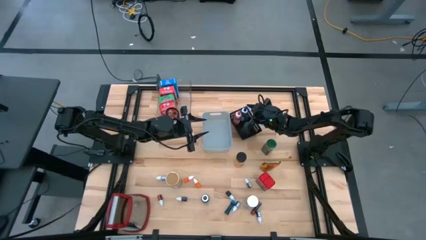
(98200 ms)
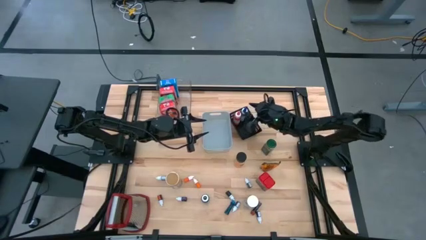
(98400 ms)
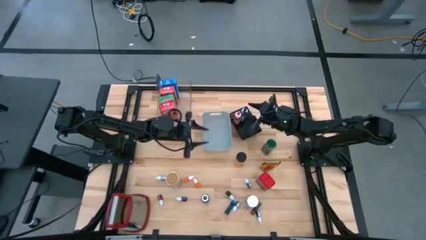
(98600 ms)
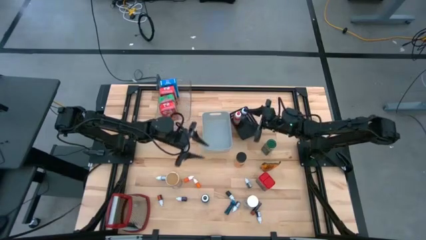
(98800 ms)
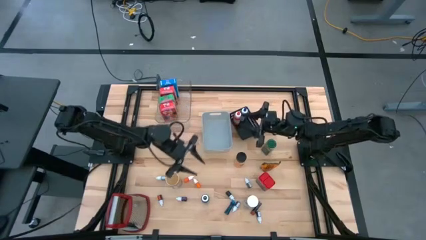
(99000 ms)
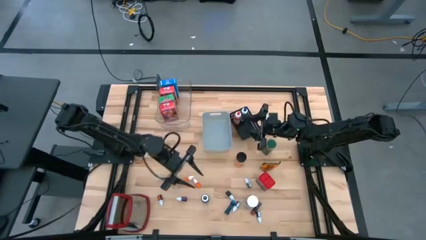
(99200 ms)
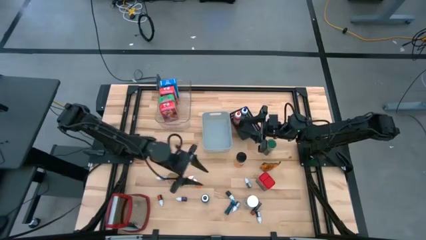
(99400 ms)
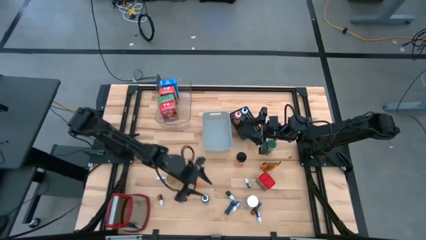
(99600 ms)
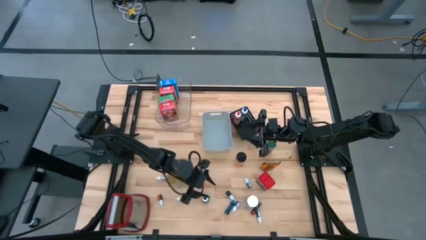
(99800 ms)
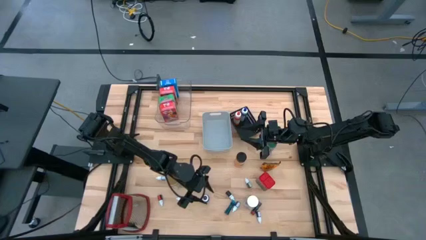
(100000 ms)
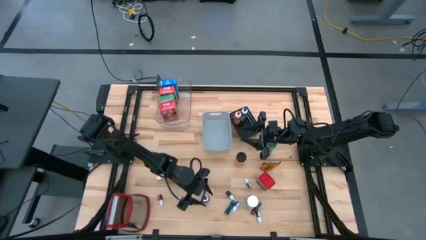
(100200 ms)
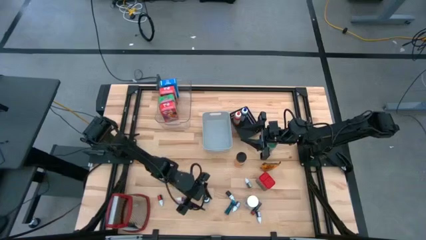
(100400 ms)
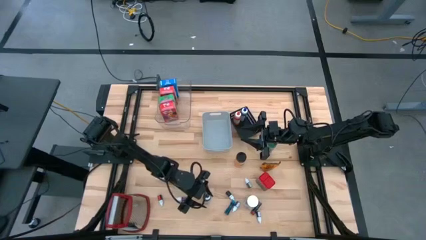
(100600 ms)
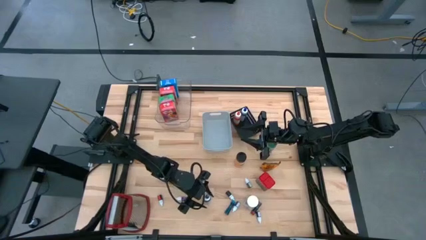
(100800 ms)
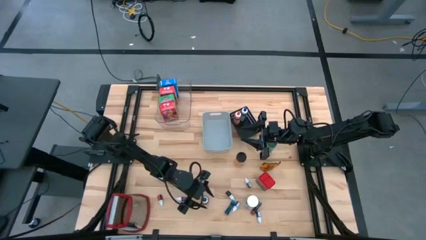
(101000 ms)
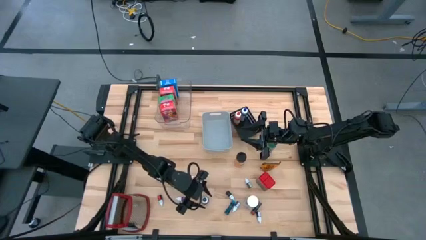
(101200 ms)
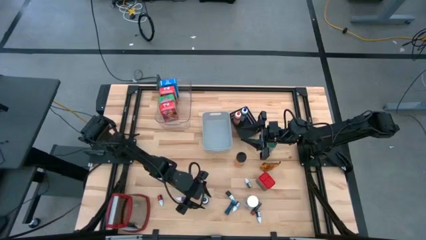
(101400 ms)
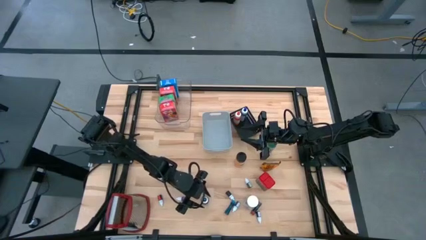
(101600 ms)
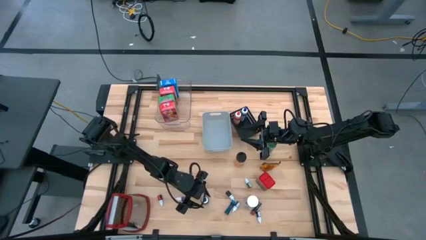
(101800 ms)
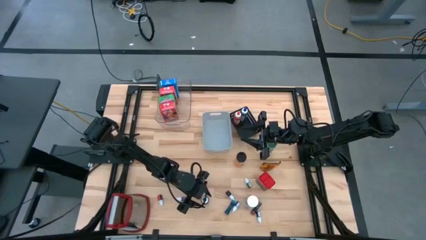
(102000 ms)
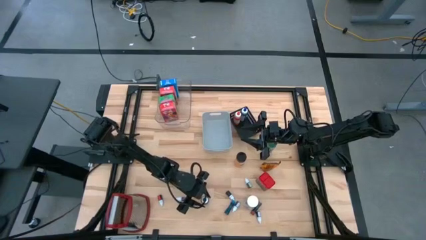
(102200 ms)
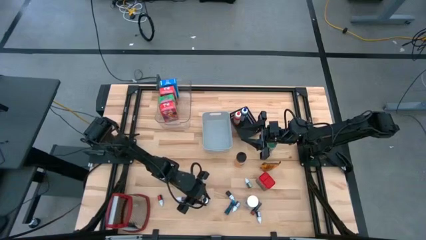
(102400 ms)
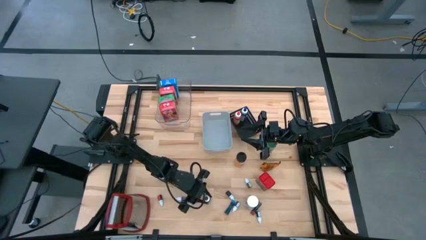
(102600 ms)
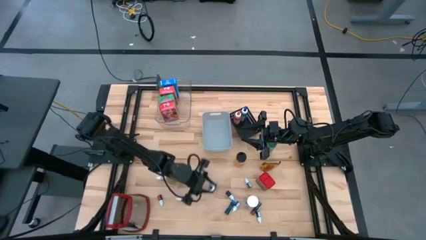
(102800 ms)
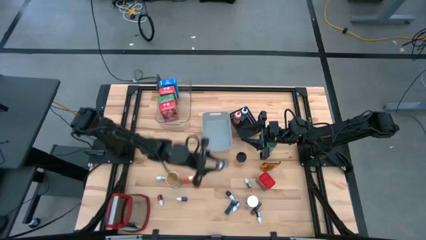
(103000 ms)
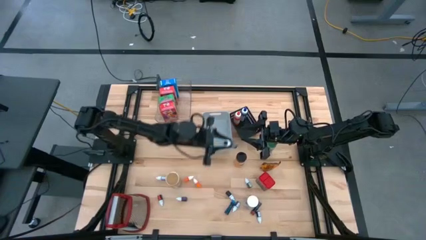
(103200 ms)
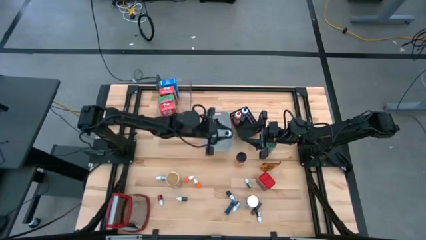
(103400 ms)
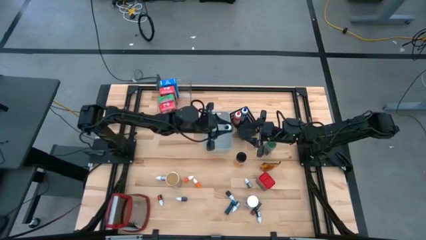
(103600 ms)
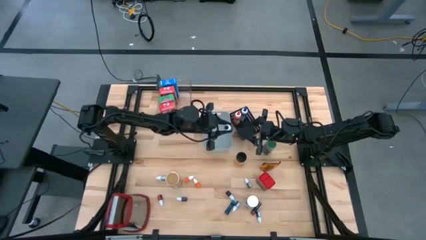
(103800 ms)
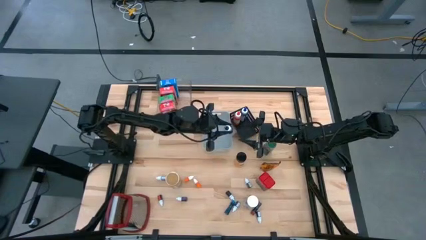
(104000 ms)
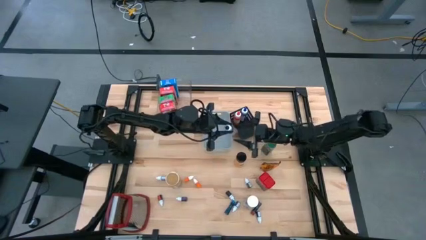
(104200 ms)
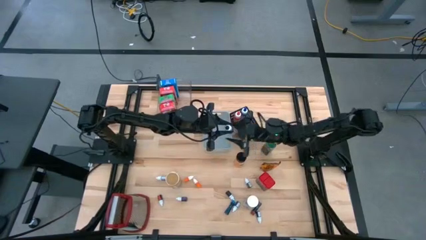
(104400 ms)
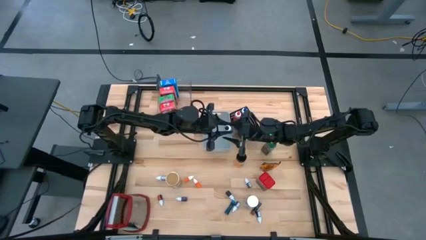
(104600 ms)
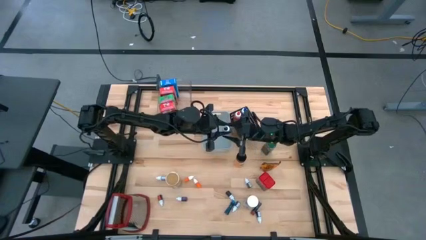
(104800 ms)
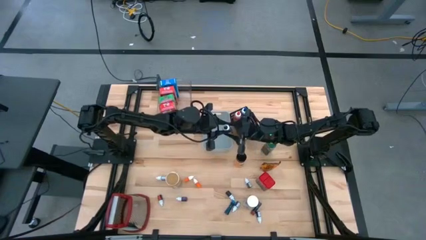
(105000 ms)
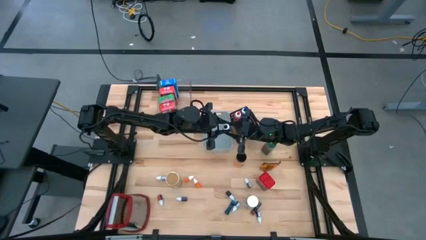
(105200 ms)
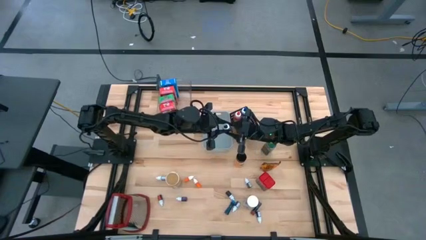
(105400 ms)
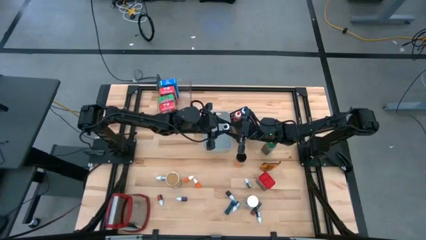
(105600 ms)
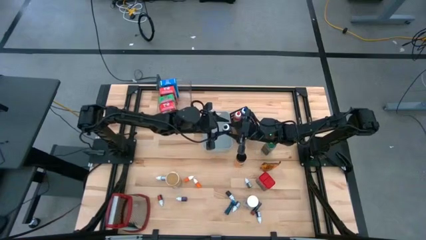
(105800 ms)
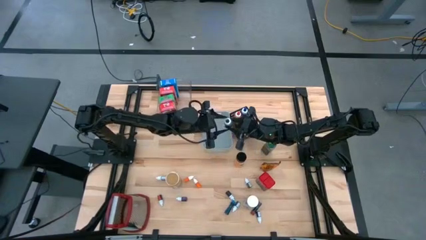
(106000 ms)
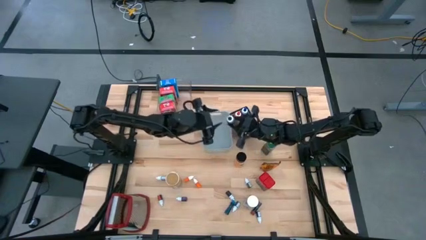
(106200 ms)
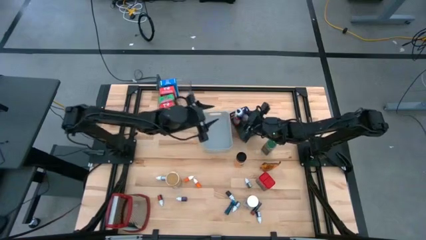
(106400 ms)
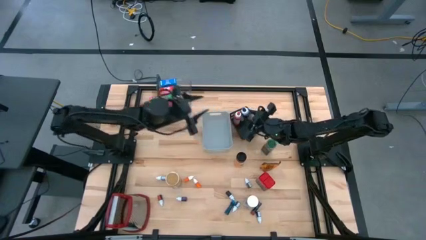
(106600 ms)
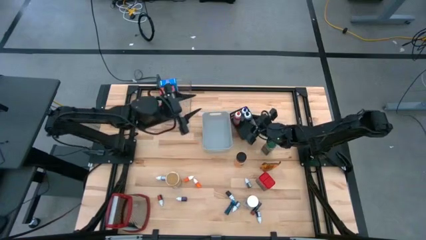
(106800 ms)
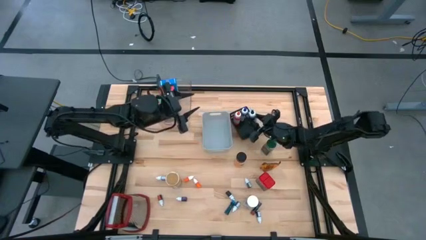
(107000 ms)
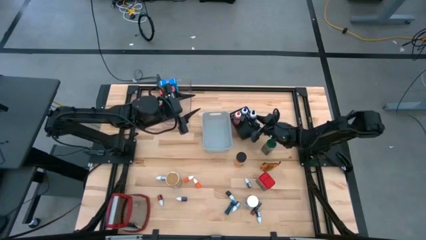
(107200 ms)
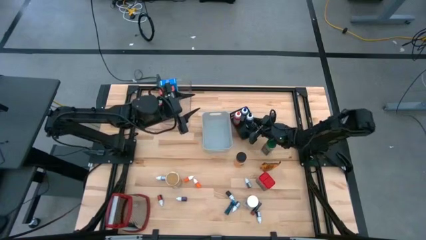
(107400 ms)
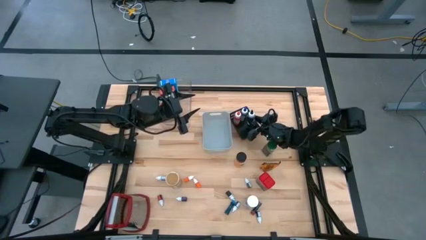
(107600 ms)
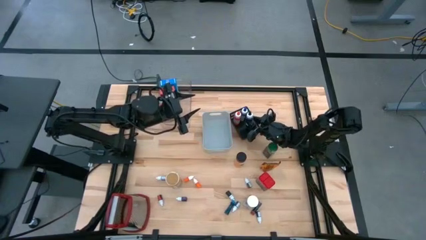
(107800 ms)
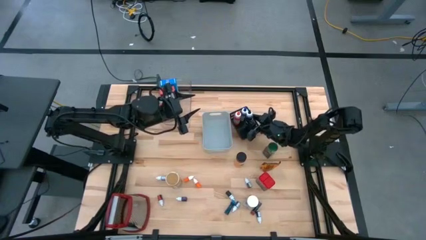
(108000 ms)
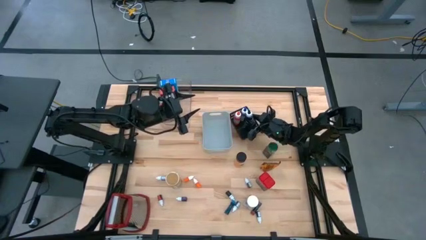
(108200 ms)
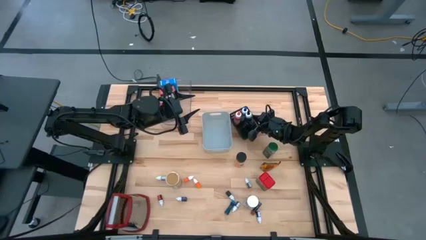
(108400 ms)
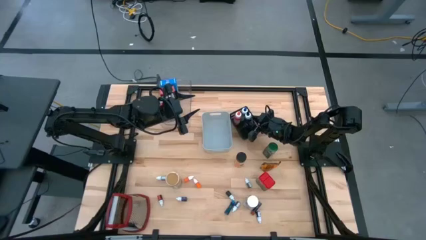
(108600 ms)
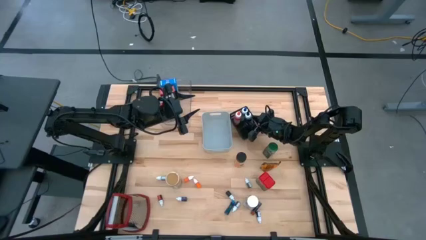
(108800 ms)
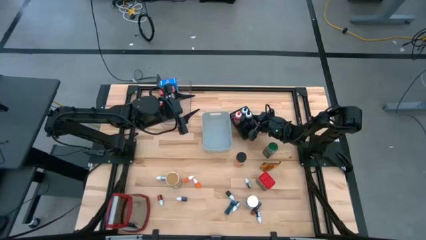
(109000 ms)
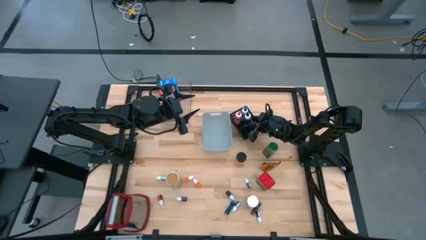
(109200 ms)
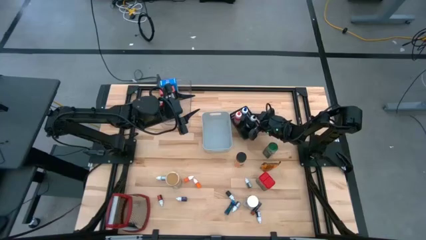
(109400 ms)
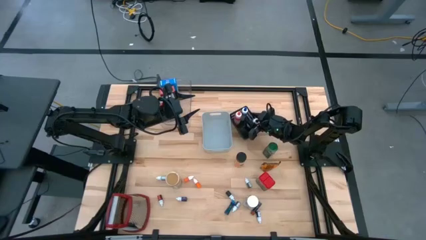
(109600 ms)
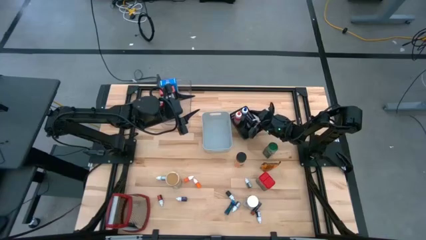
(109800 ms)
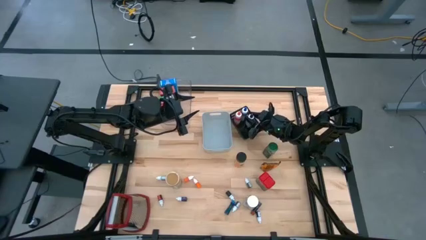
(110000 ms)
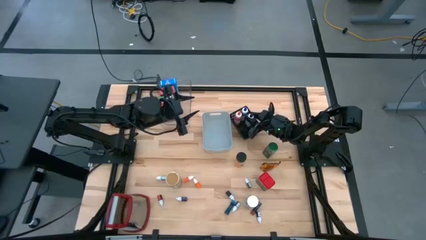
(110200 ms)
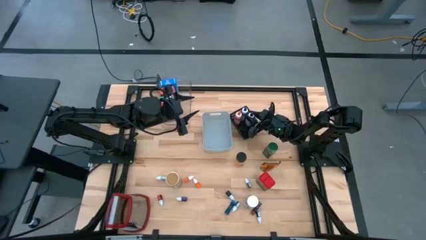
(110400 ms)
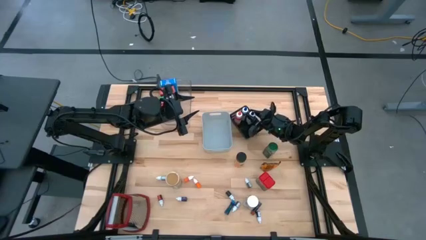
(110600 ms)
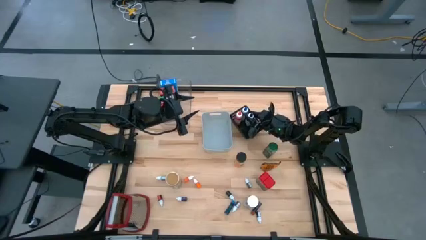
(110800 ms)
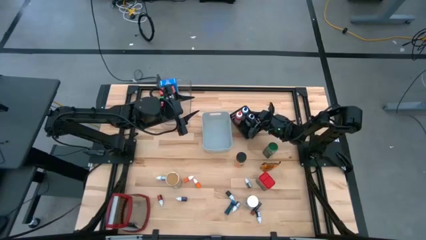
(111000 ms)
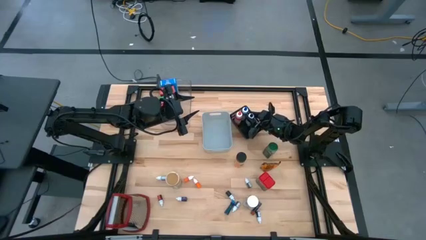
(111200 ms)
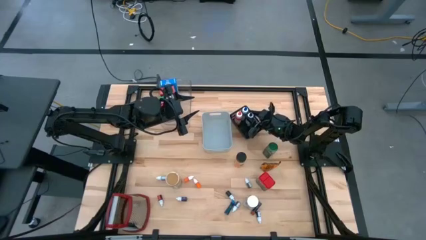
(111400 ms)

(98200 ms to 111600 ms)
Task: Pick & Place Kitchen Items
Put the black food color bottle into the black bin

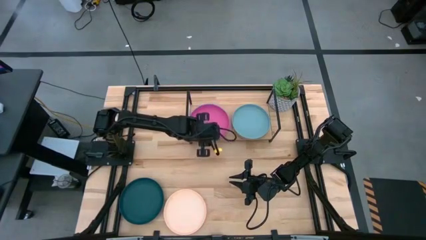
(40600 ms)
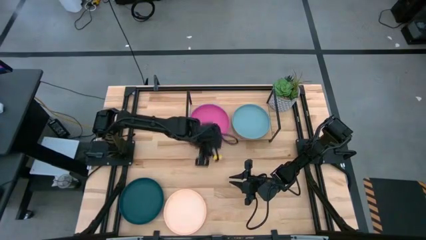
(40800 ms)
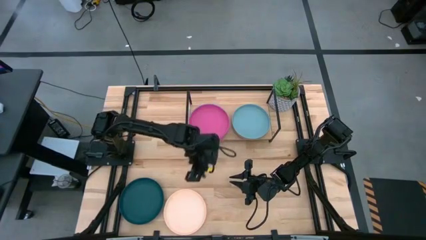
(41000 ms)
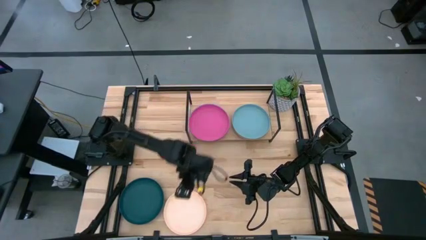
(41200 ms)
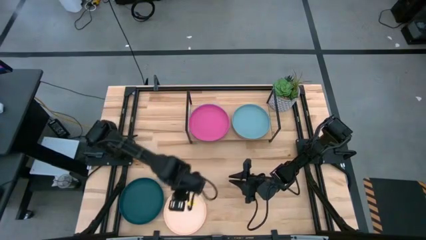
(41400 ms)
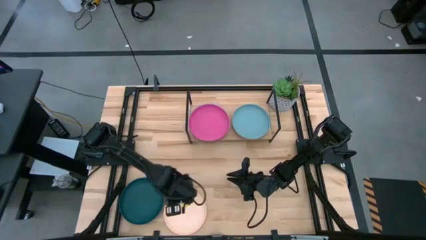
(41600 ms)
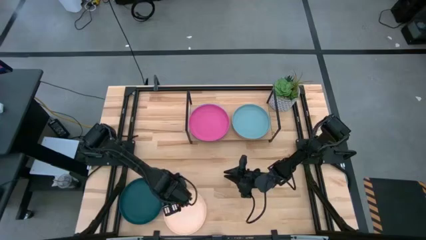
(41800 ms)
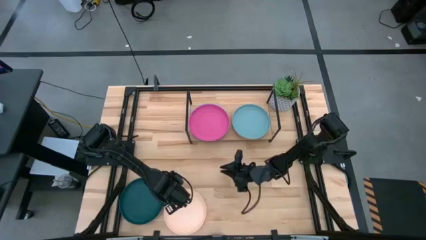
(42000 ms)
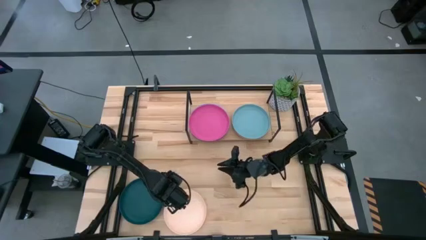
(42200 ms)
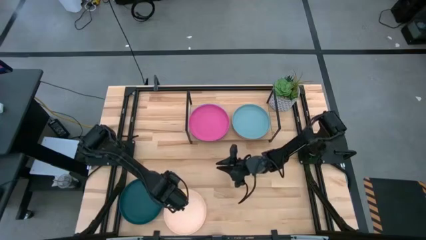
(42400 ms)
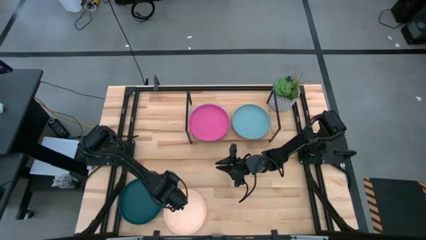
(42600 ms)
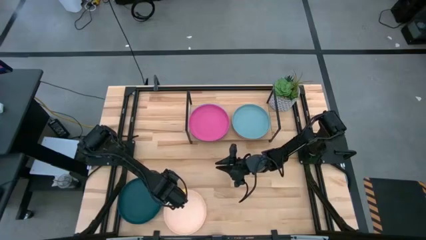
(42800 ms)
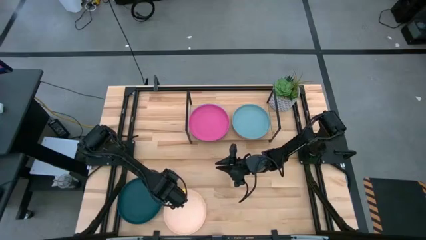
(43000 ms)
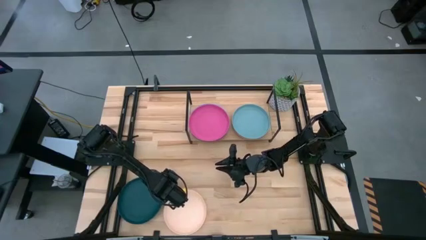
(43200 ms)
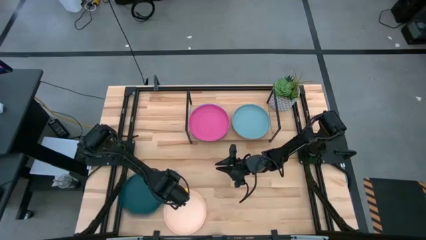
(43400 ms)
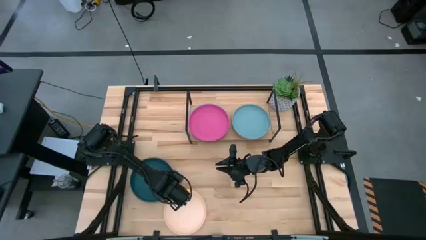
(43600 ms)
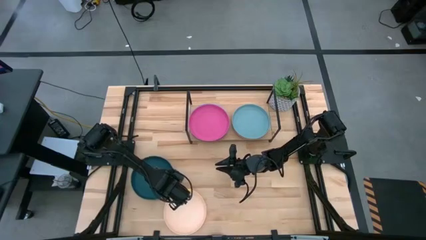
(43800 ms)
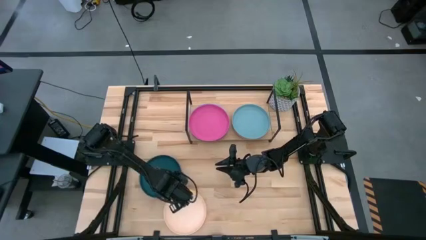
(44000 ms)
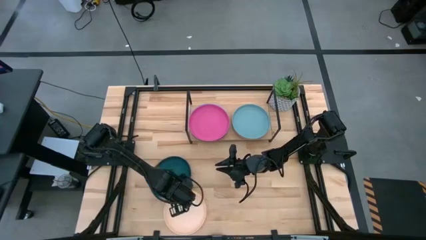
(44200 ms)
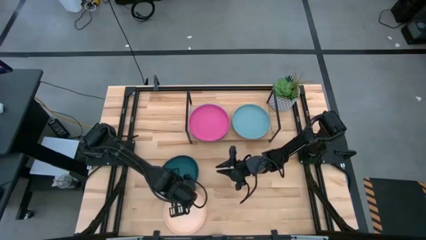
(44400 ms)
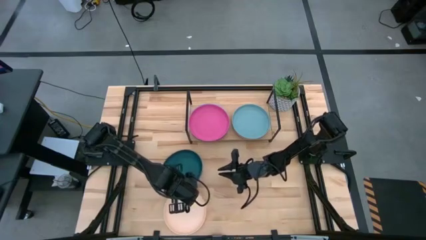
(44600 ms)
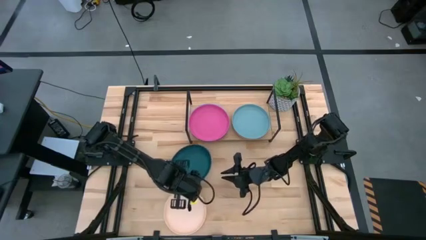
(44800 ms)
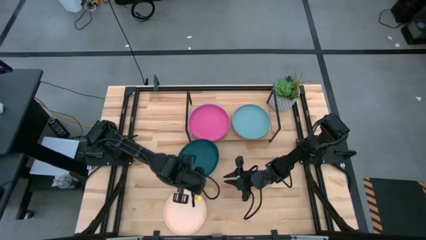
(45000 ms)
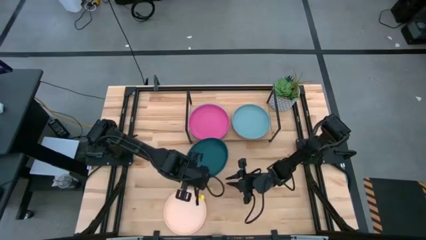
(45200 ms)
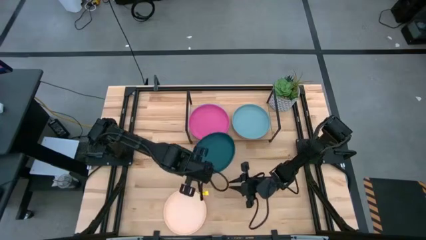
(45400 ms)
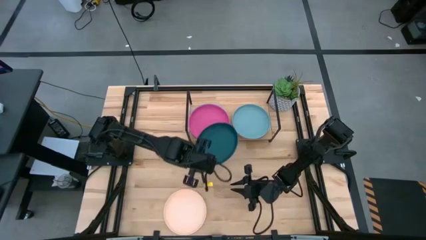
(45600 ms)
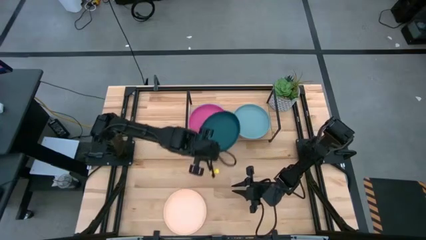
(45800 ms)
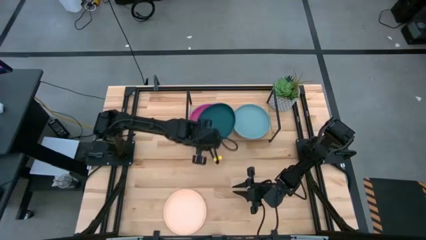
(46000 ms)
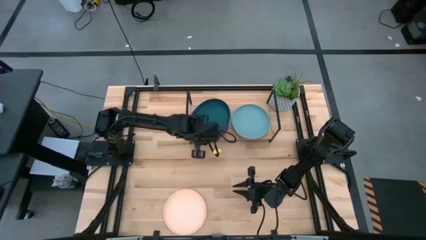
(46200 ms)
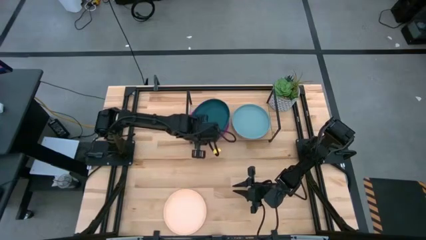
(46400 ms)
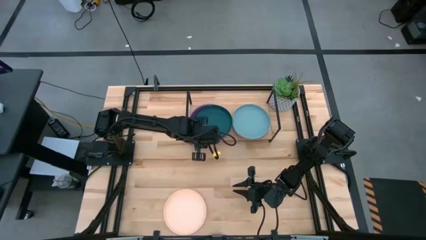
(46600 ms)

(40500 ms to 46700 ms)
Task: Place and stack plates onto a shelf
Stack the green plate on top of the pink plate on the shelf
